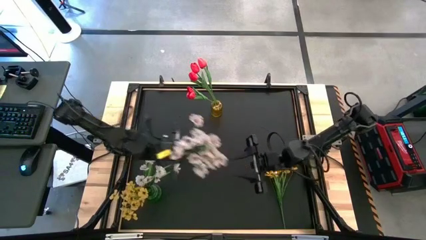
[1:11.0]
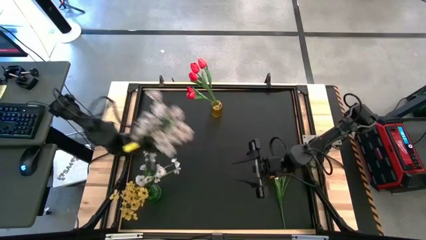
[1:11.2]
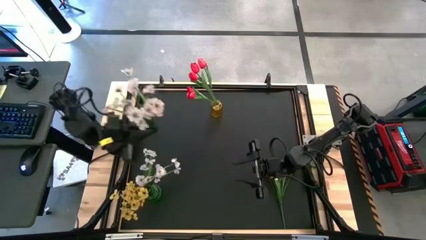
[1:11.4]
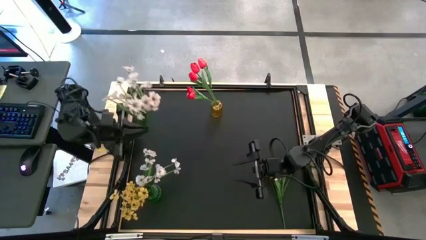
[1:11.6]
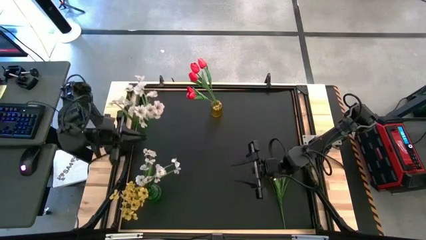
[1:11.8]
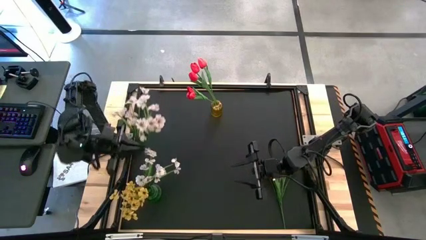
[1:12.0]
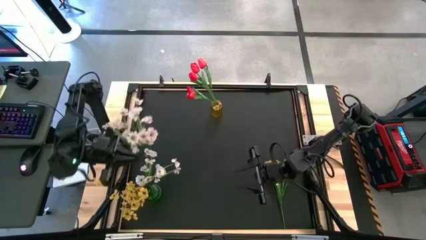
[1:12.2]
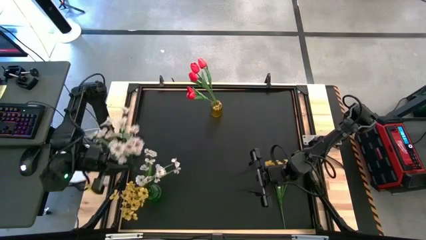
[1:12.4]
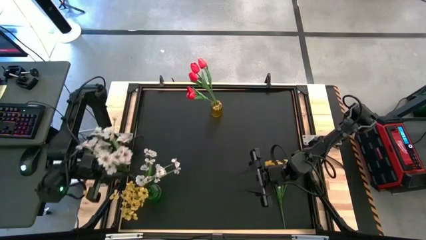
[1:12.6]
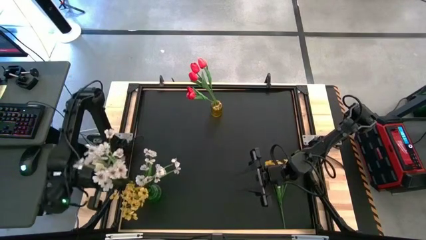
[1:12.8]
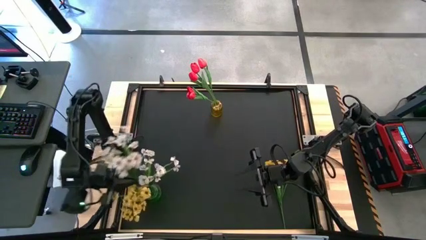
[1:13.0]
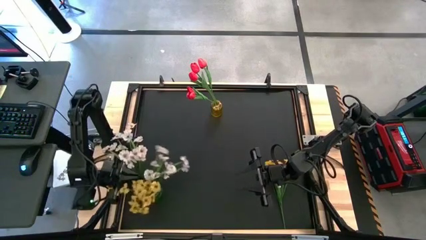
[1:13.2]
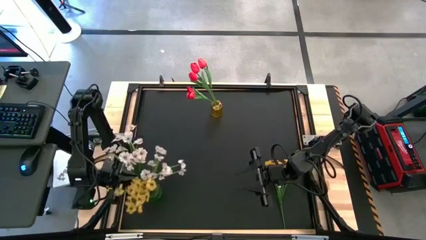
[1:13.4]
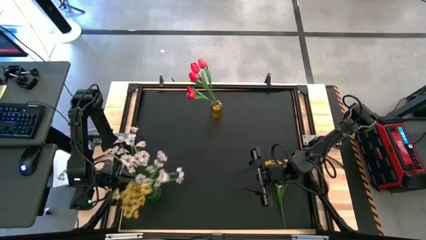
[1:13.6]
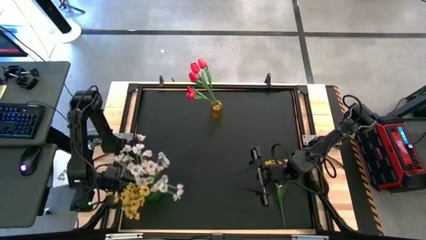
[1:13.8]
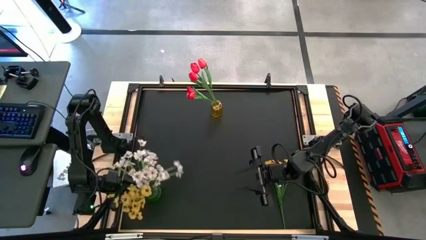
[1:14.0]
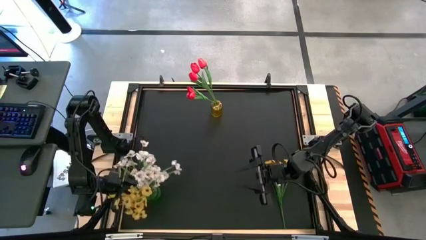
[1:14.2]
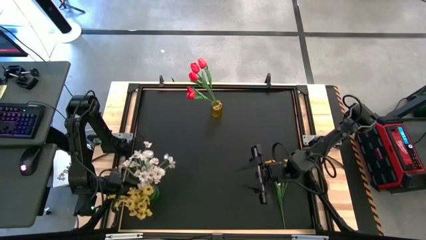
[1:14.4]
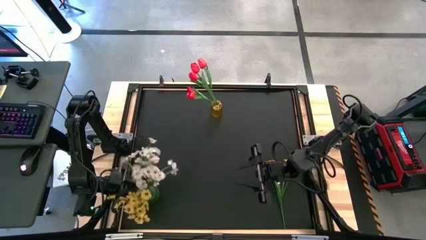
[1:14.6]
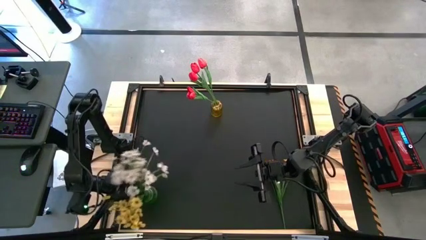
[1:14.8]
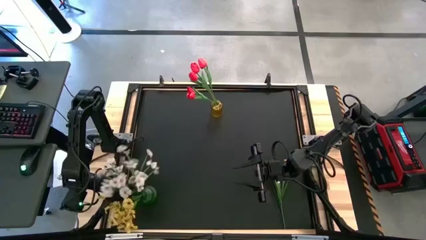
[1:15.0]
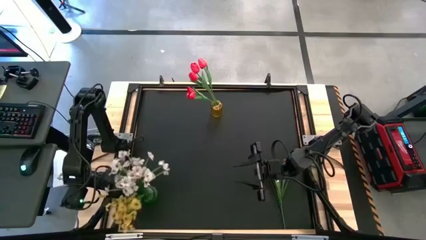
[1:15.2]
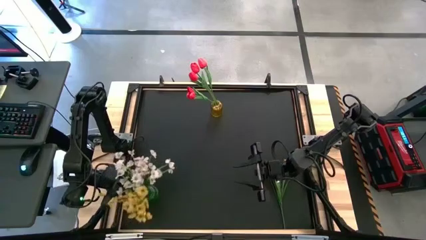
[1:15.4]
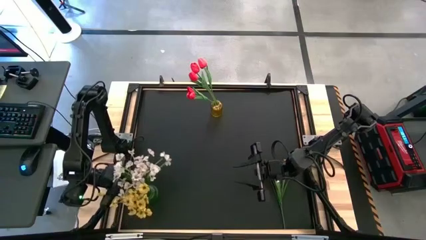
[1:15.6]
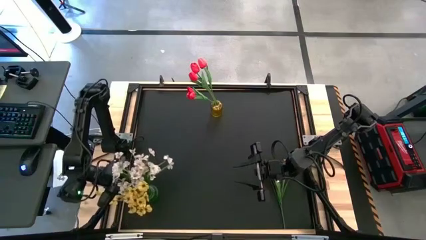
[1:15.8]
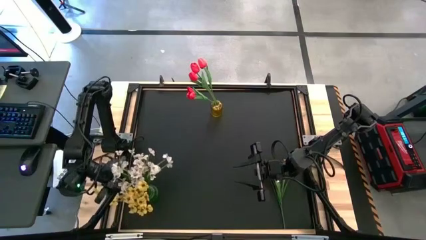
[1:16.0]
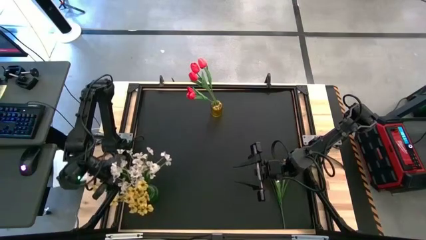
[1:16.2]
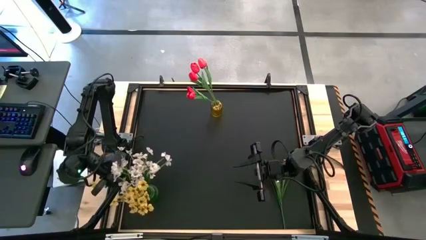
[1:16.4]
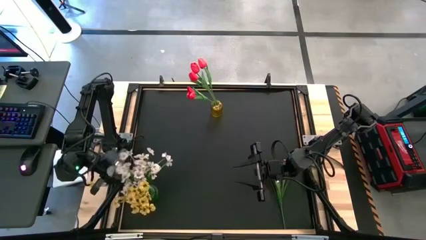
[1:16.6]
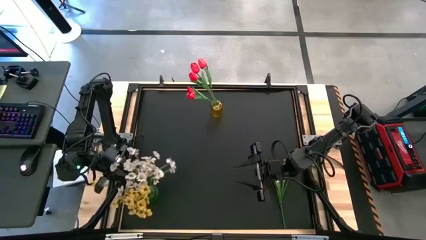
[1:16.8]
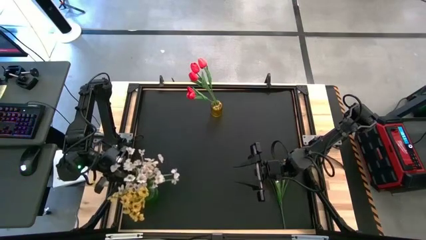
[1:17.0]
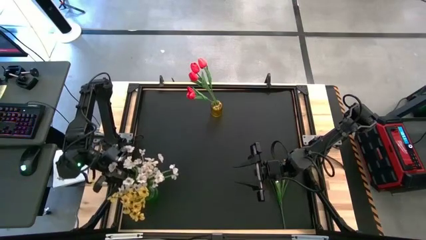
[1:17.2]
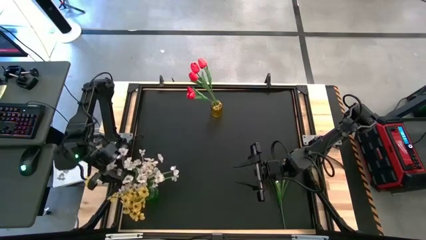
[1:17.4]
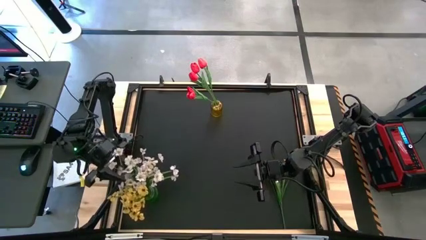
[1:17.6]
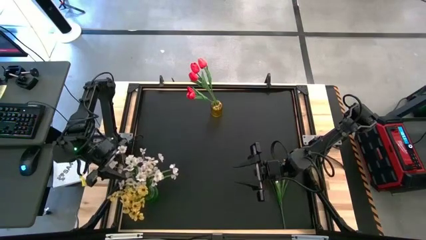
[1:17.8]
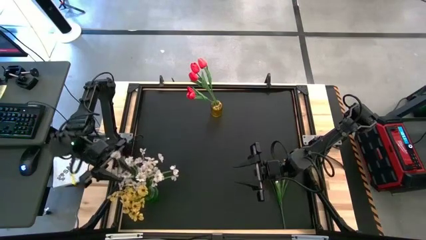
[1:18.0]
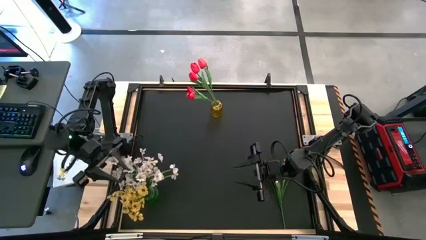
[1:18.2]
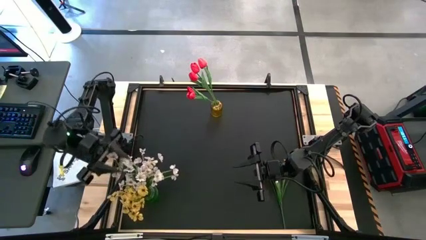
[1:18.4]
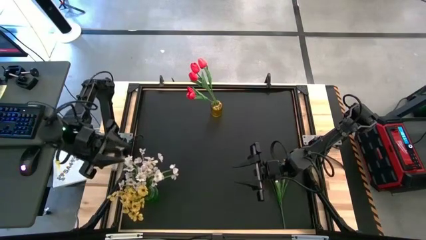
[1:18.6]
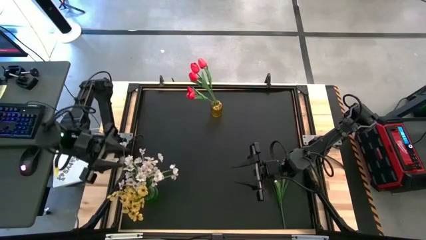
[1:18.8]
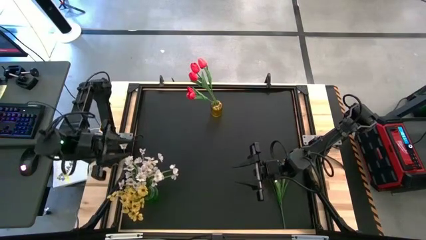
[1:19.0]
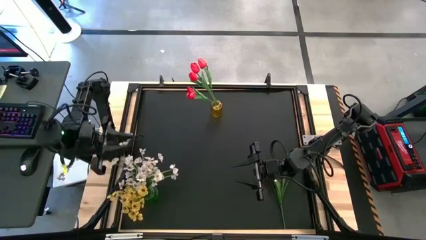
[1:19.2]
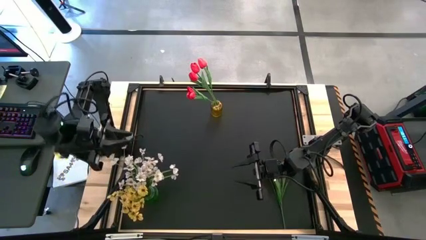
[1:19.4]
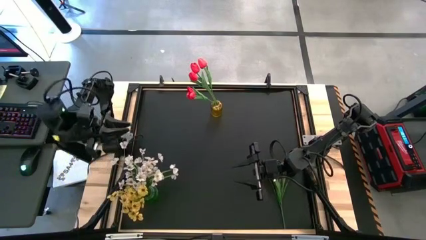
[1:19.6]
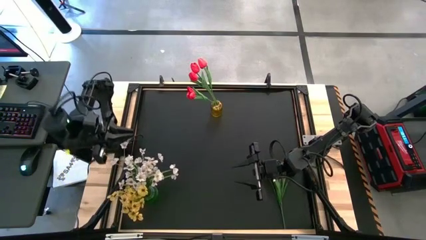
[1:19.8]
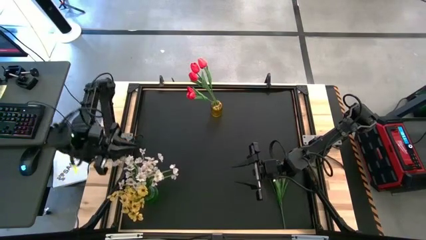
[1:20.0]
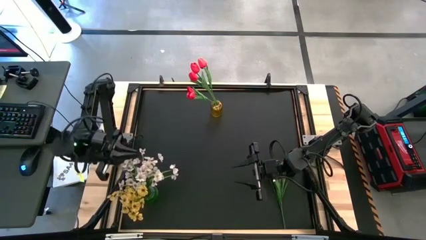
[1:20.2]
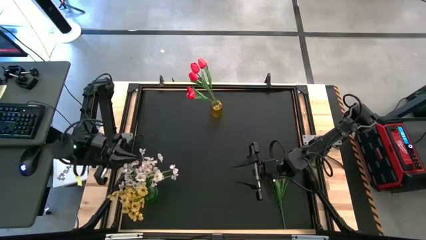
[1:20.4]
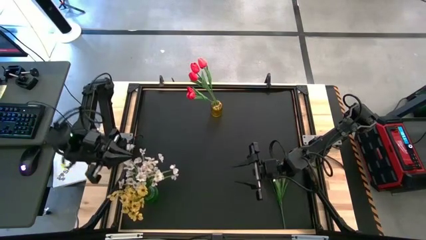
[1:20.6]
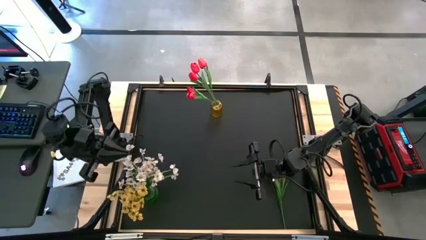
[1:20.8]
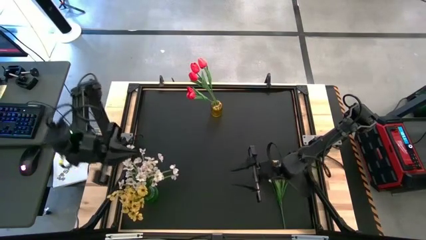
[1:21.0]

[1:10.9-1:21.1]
Task: Sort flowers into vase by color
Put the white flowers into the green vase

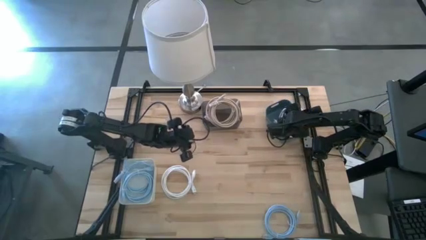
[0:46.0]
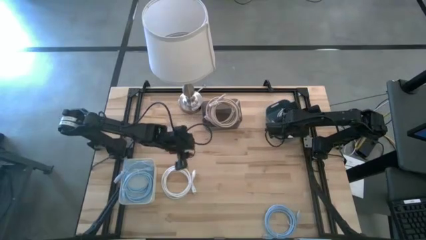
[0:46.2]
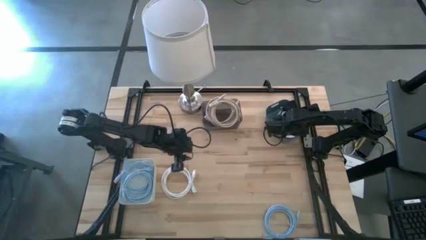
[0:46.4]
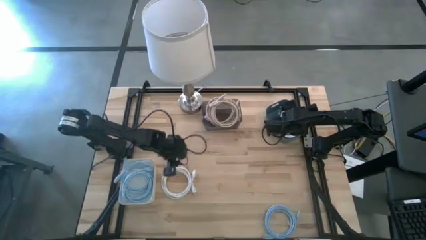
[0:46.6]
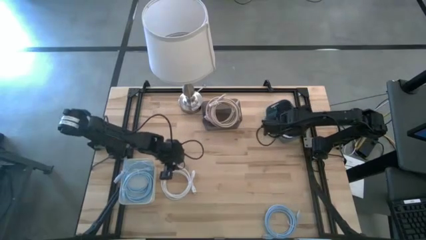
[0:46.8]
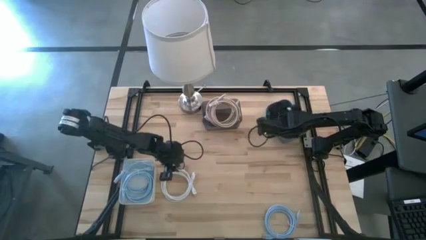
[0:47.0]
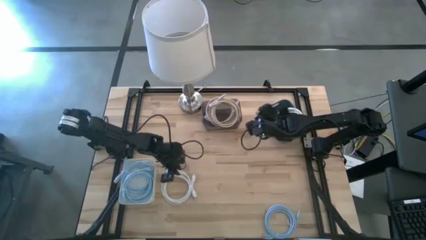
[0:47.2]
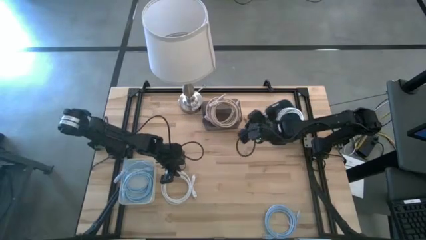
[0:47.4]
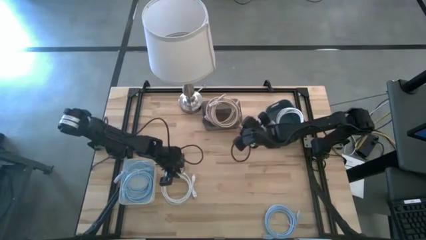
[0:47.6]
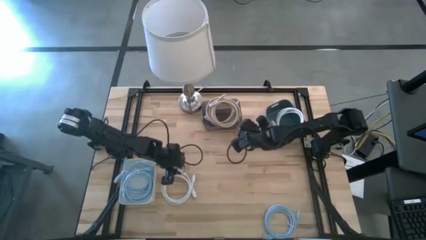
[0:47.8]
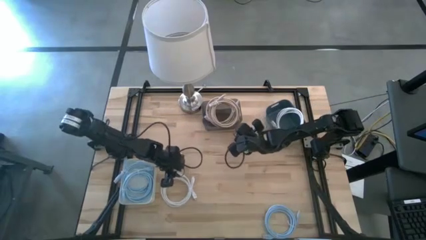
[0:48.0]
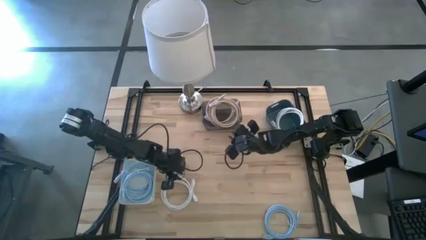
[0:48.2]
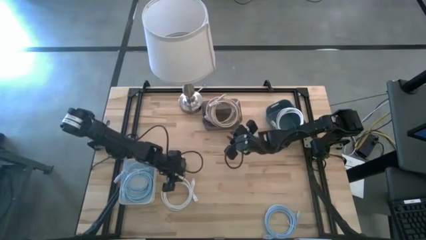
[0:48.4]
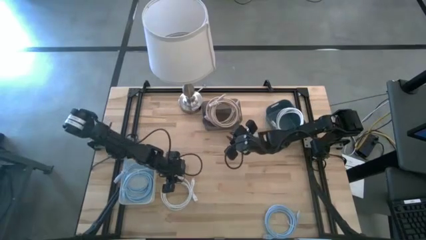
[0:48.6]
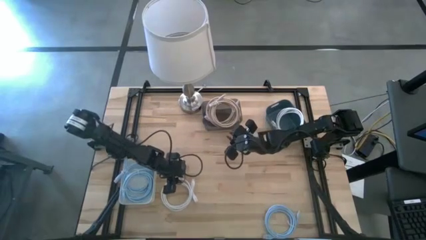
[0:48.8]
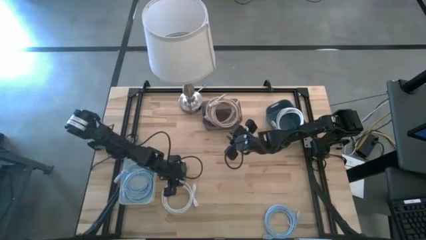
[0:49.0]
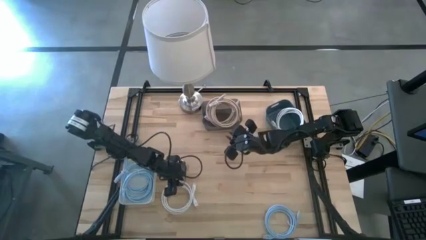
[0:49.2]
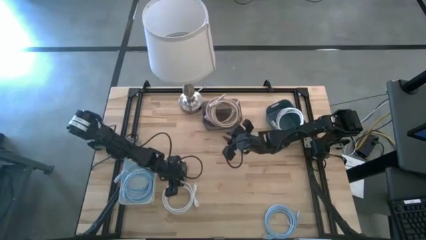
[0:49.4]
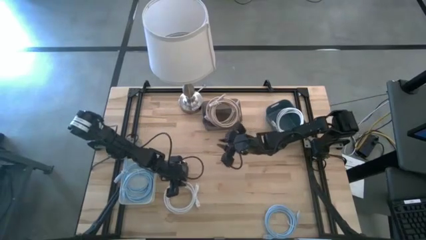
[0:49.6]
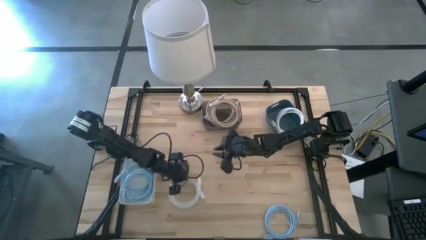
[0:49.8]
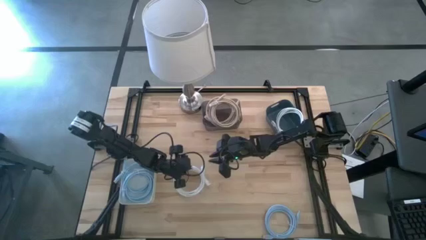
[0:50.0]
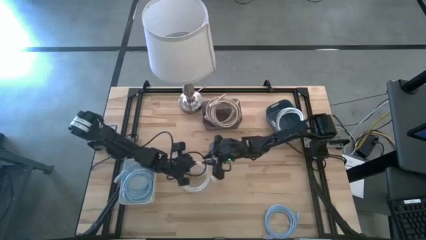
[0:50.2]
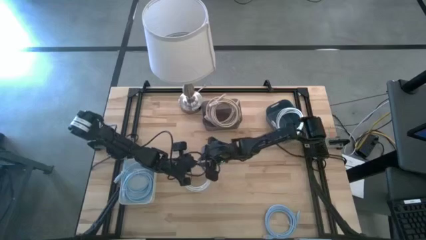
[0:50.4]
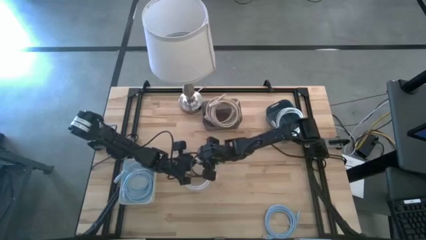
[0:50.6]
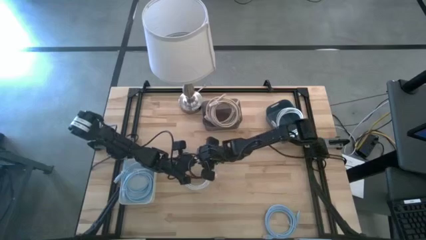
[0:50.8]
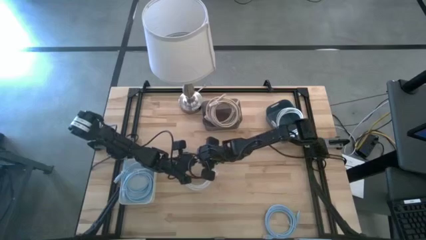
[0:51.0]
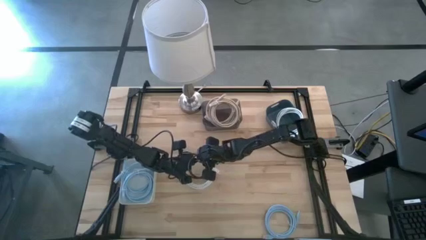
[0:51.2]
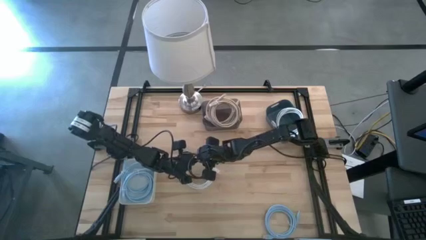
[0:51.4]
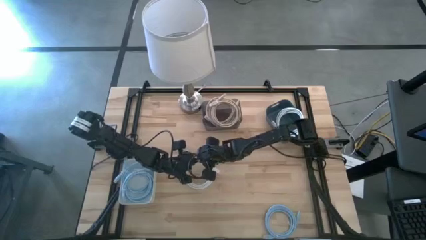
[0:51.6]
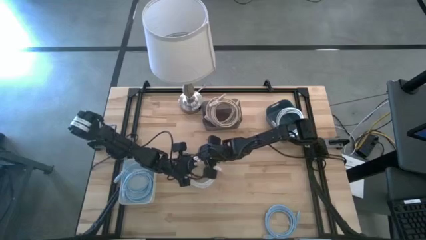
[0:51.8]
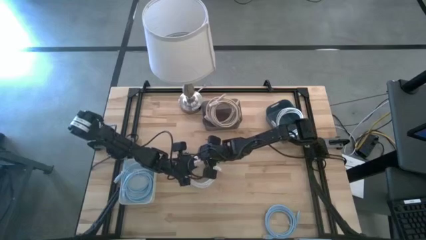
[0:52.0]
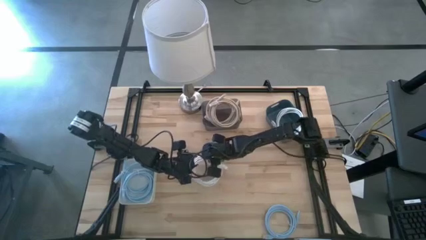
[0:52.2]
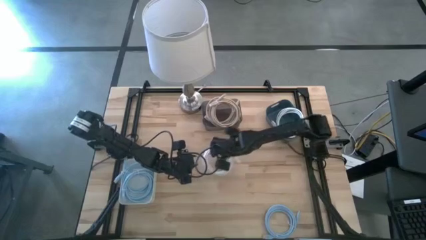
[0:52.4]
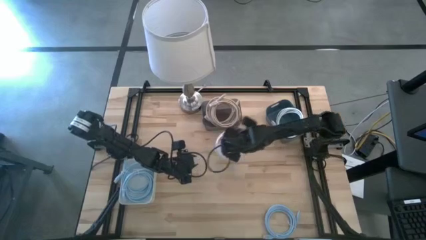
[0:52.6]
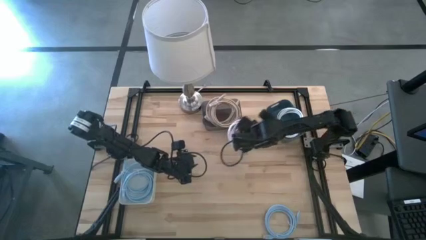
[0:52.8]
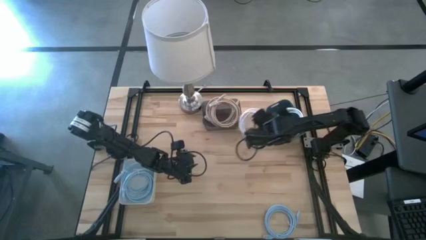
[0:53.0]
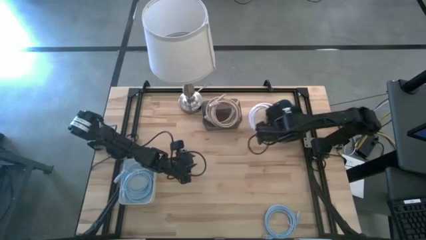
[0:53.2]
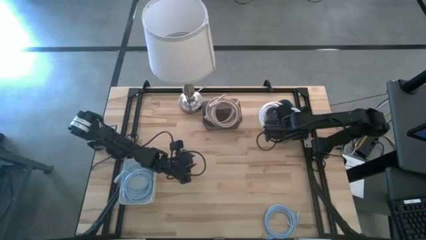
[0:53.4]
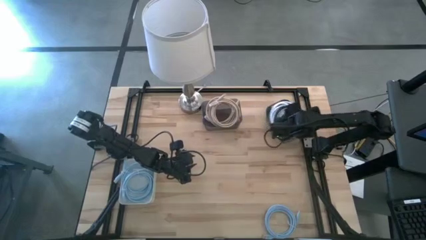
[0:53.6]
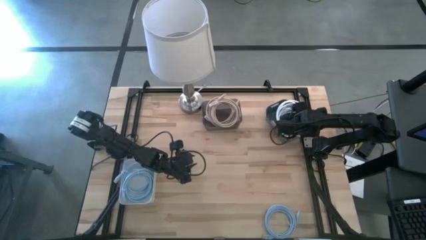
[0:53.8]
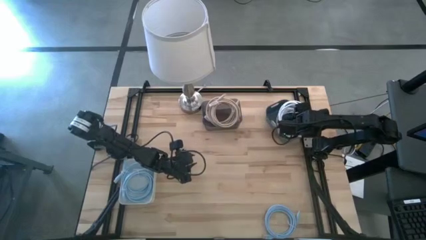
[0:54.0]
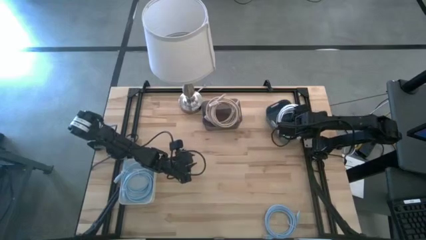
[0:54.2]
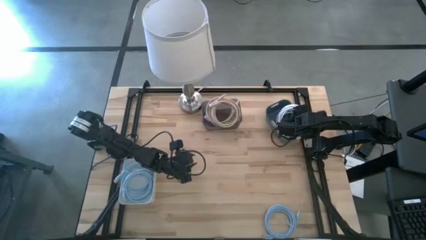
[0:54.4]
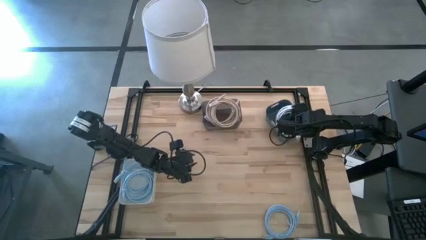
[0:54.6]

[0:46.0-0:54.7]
Task: Sort HDMI cables
Put the white HDMI cable into the blue bin
